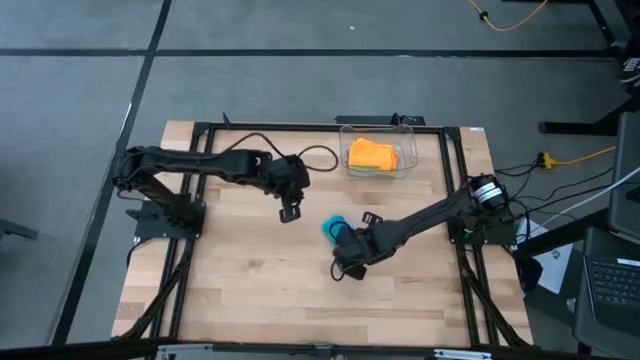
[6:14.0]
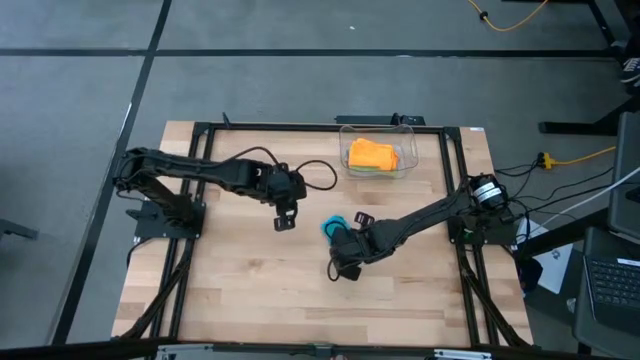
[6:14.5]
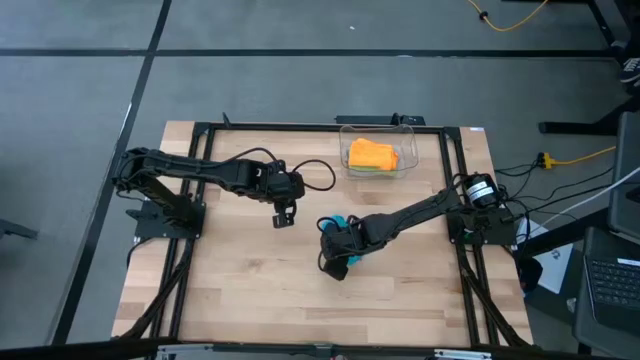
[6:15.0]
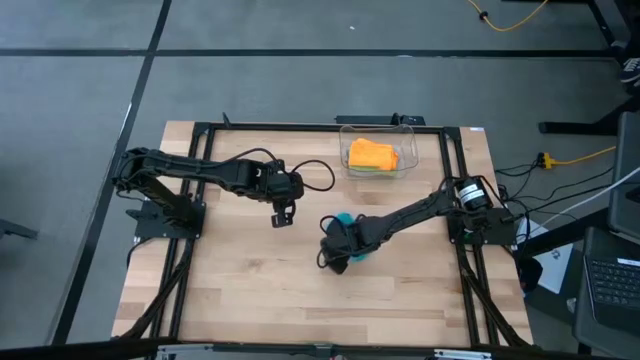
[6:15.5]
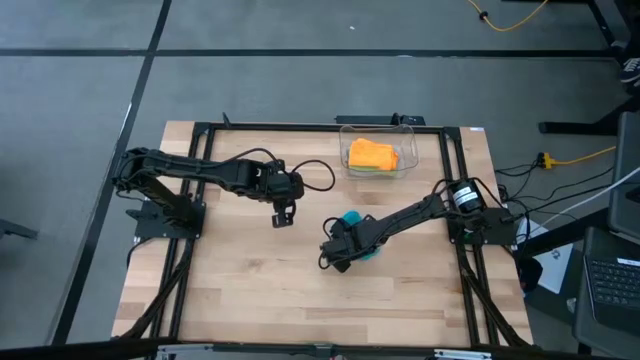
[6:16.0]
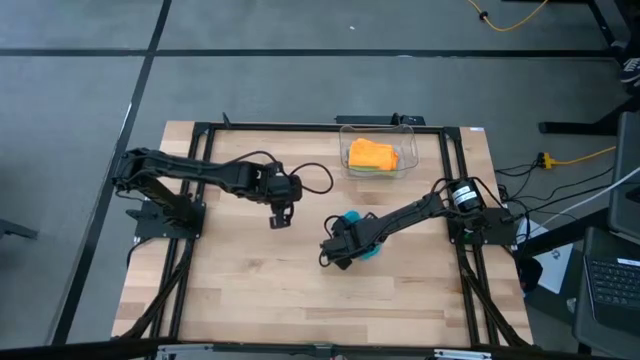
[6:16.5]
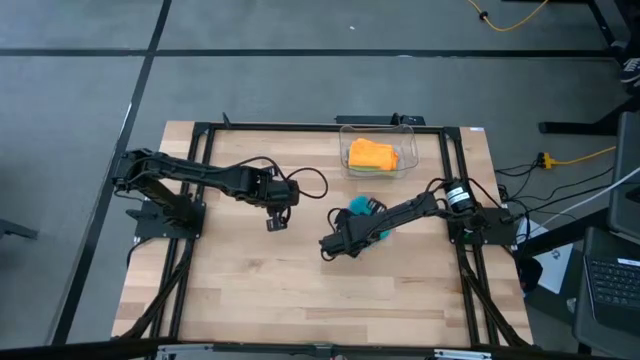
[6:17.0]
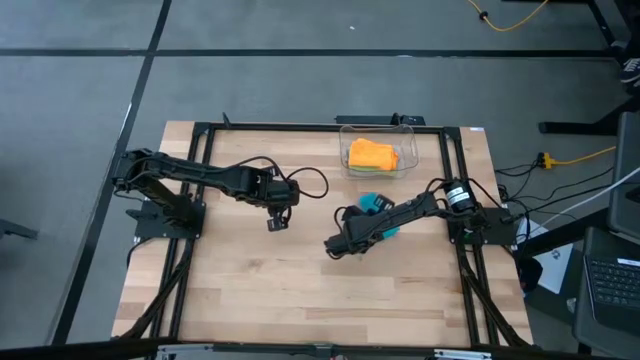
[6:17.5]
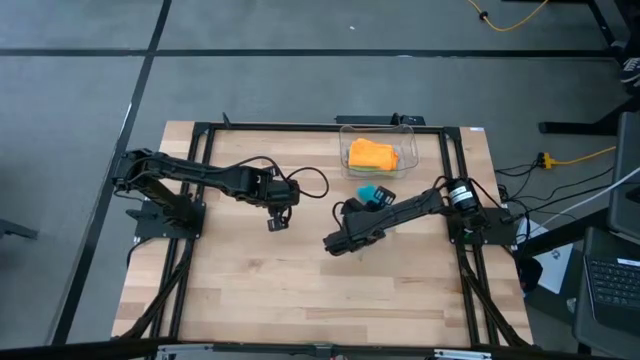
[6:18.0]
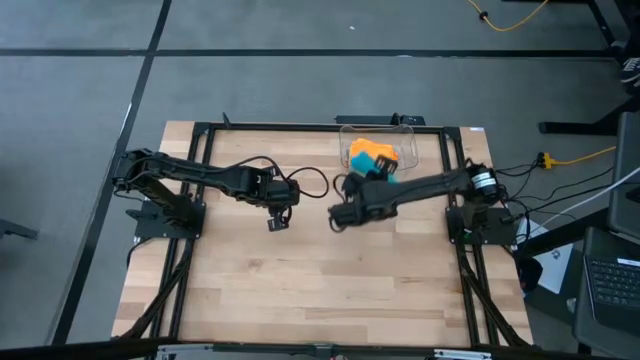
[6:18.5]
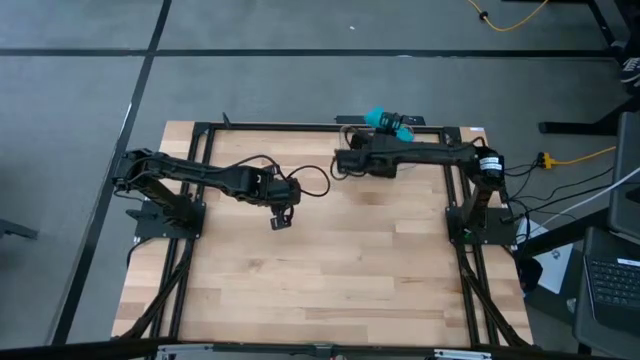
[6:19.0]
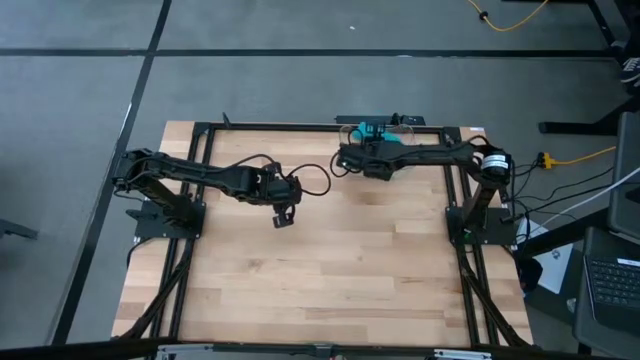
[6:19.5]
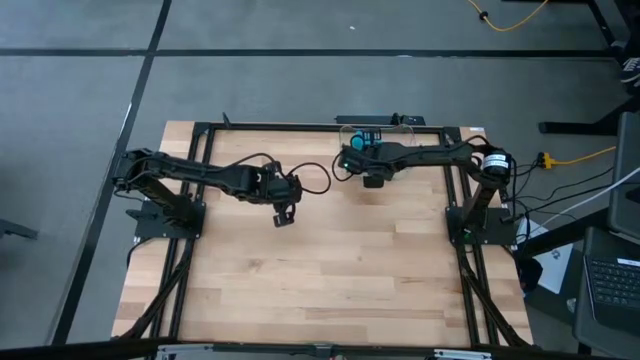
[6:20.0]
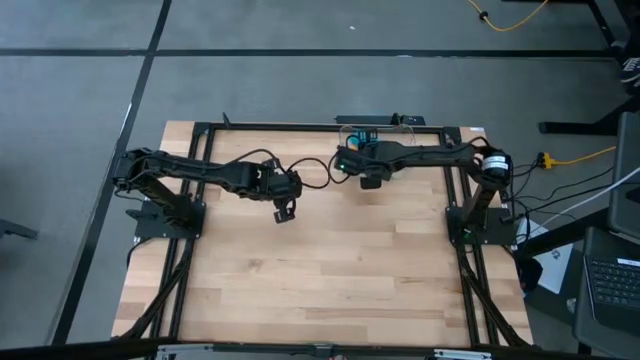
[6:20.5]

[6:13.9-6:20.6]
Task: Fold microfiber towels
Put the folded blue microfiber into the transparent bin

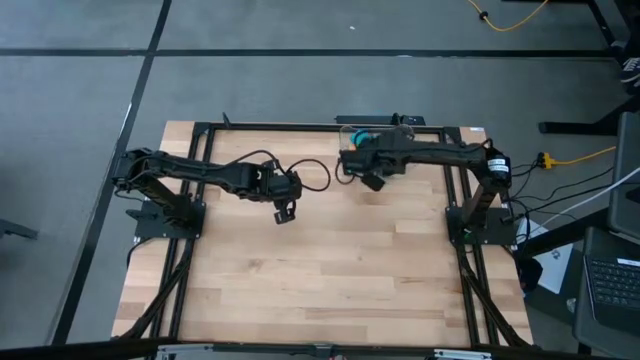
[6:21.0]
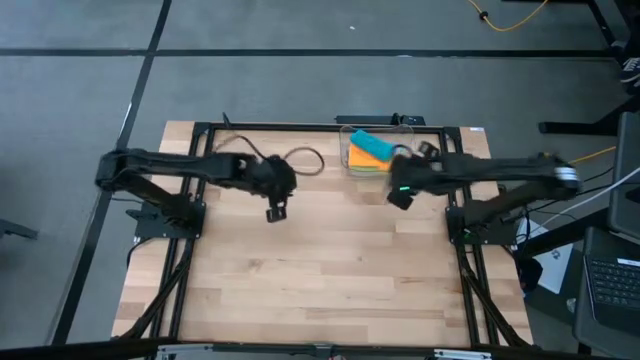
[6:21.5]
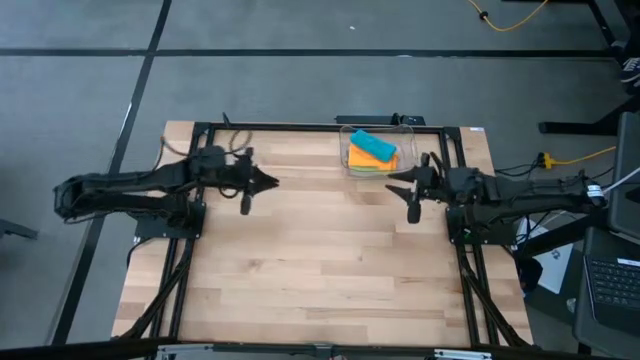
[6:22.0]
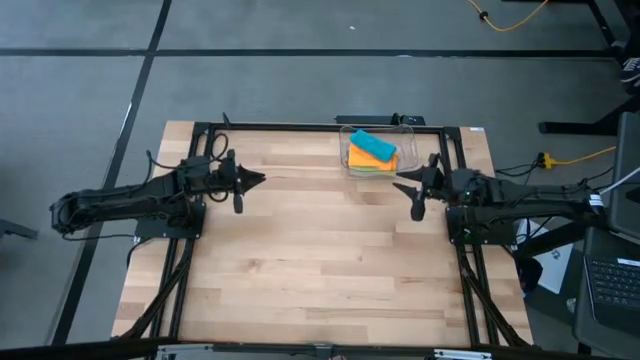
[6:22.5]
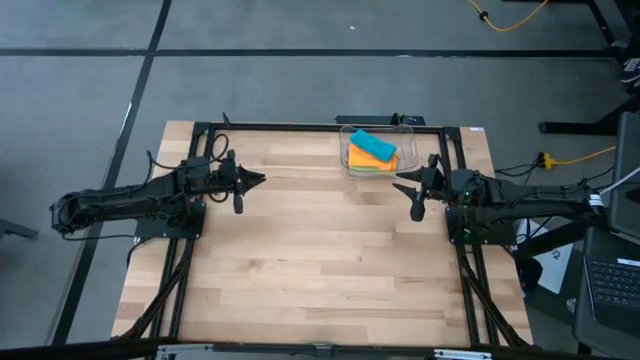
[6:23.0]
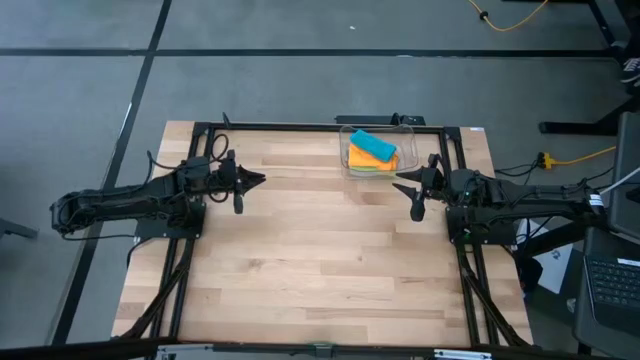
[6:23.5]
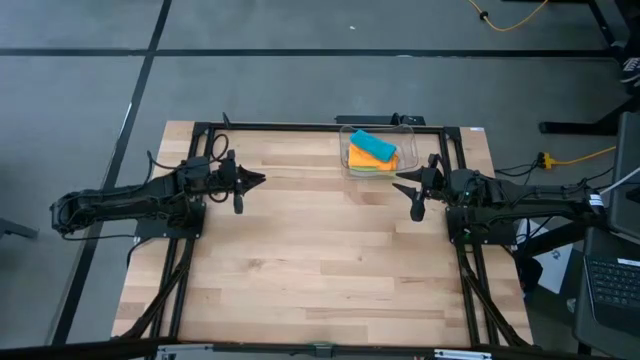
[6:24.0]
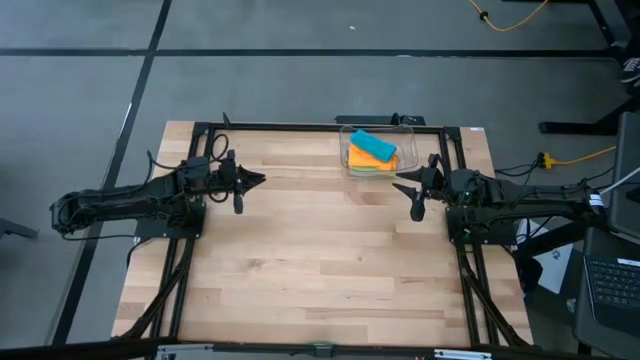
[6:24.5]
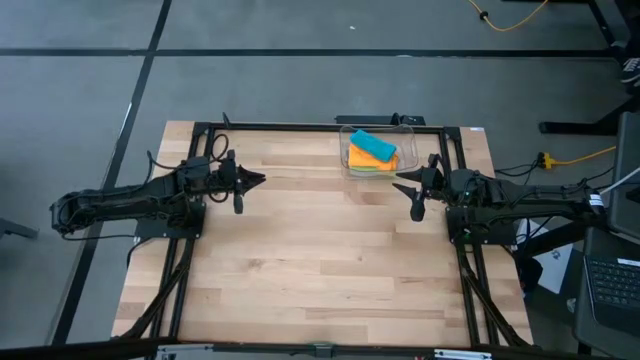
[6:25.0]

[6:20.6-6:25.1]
Return to Home Position

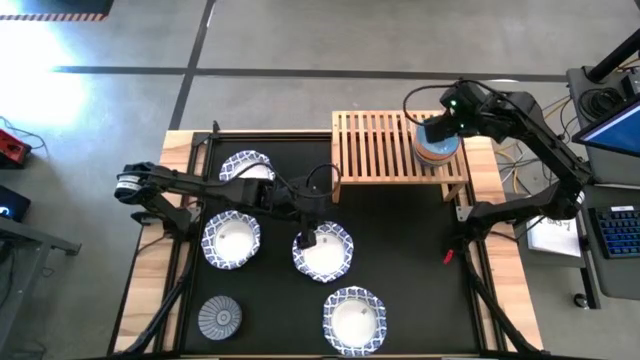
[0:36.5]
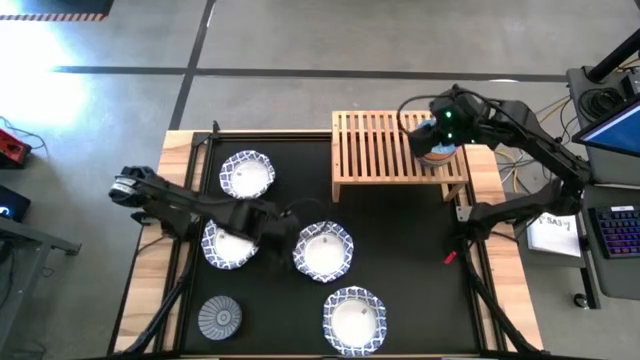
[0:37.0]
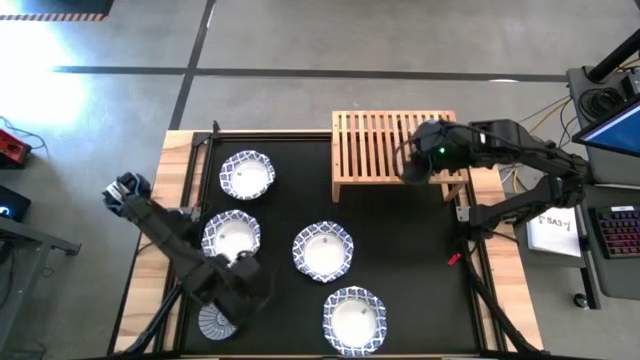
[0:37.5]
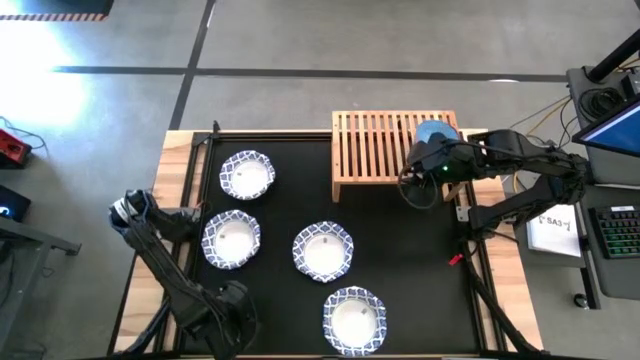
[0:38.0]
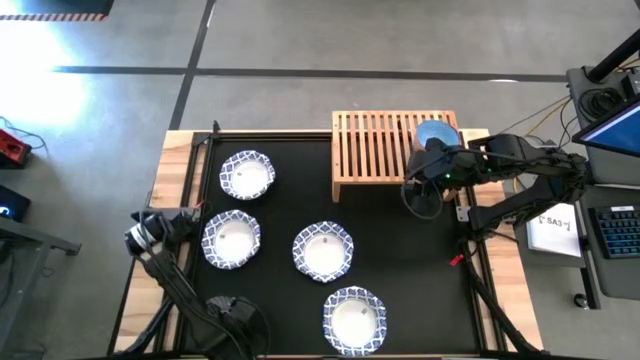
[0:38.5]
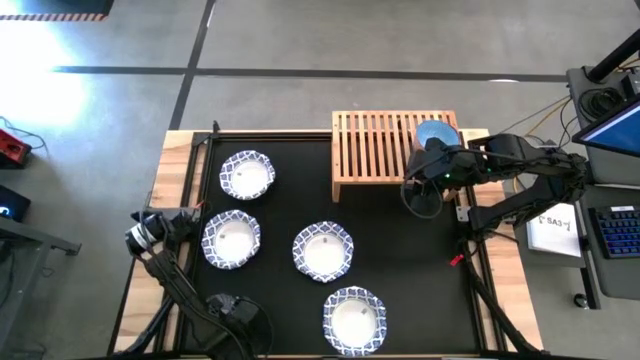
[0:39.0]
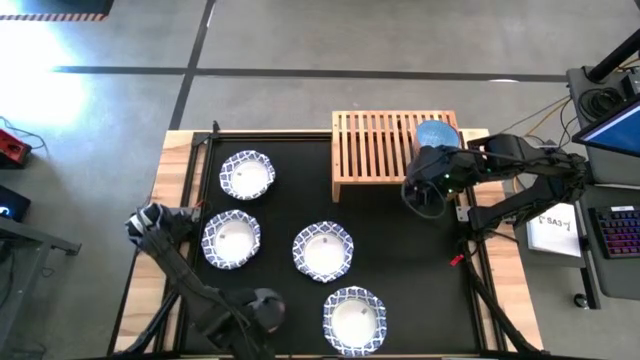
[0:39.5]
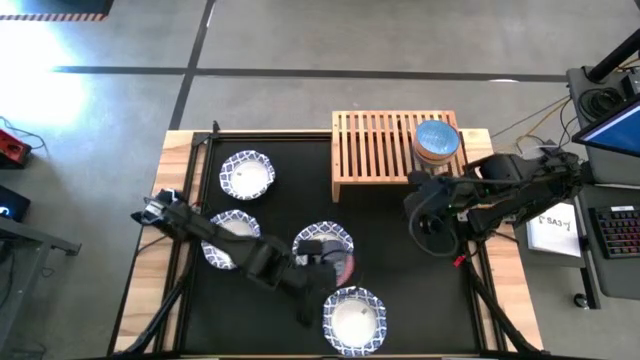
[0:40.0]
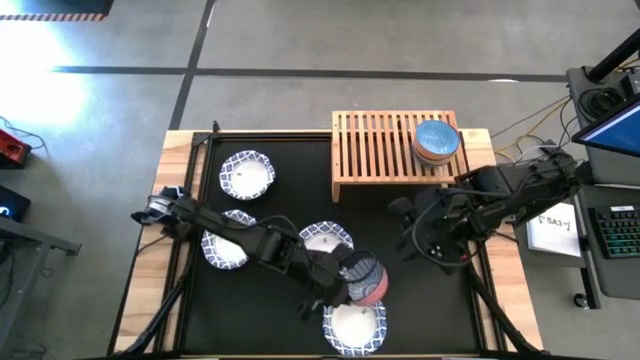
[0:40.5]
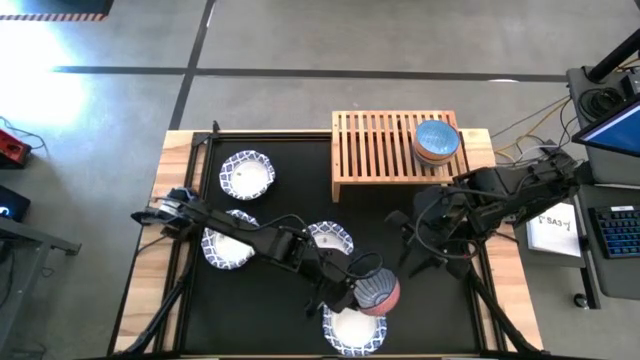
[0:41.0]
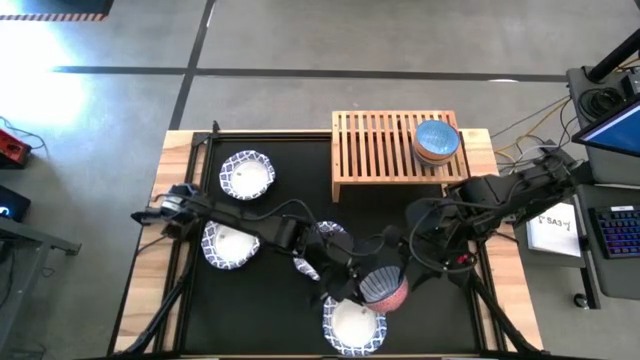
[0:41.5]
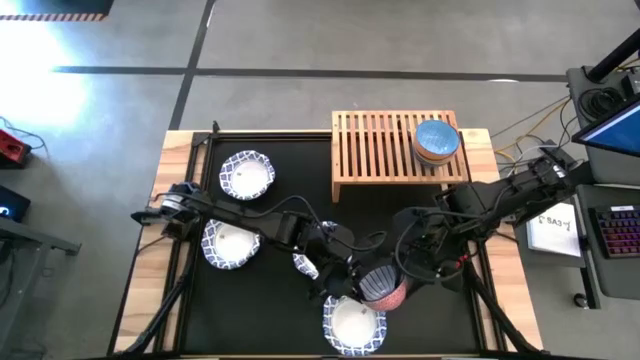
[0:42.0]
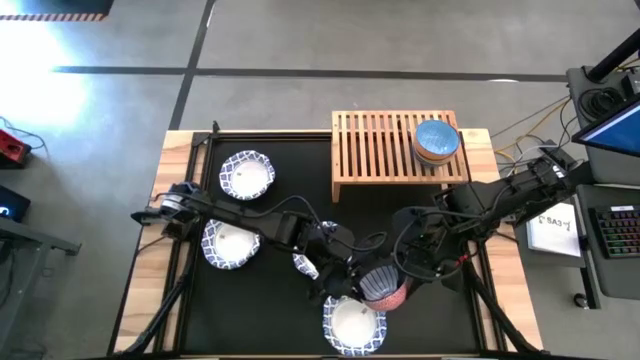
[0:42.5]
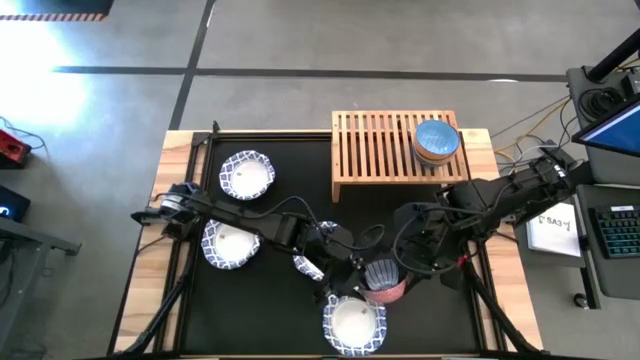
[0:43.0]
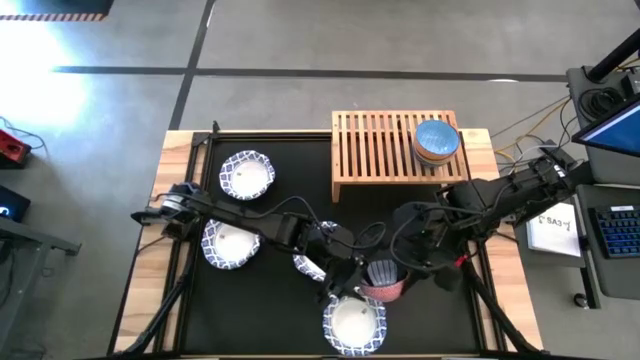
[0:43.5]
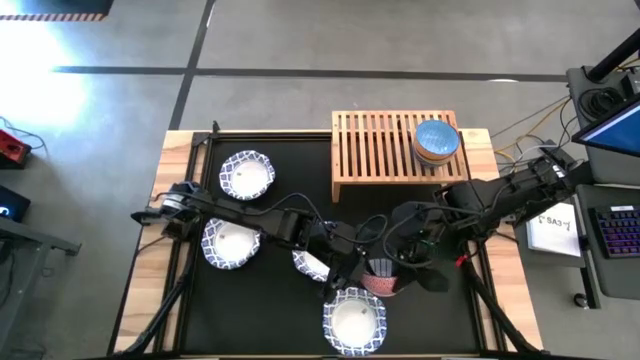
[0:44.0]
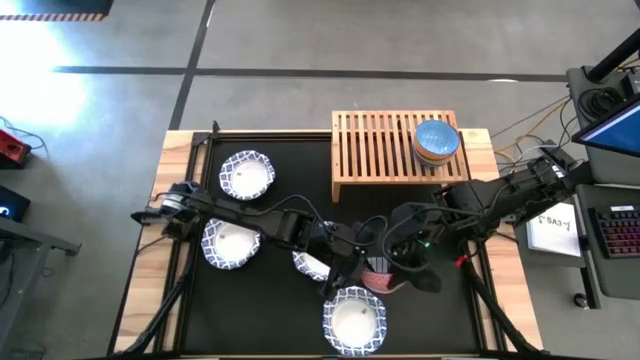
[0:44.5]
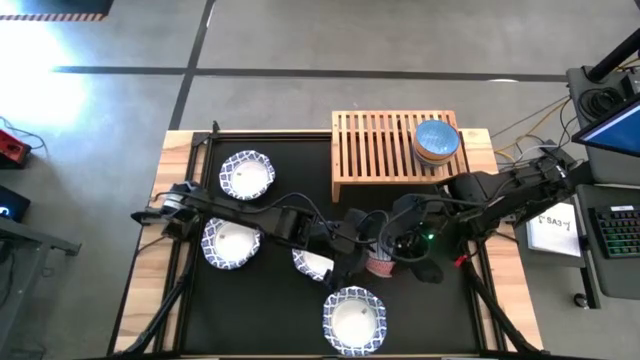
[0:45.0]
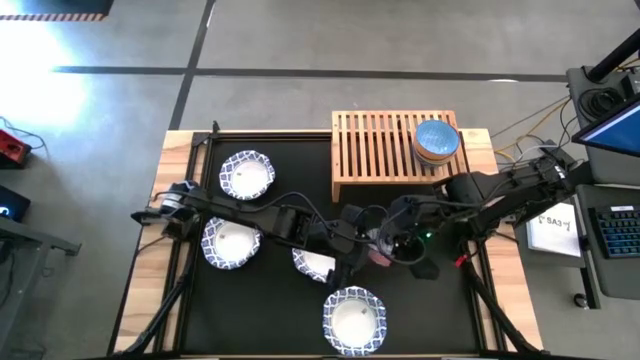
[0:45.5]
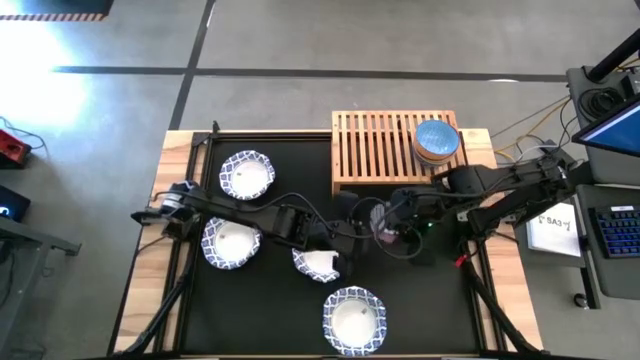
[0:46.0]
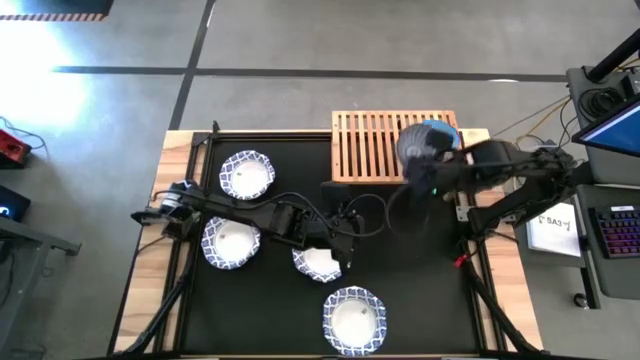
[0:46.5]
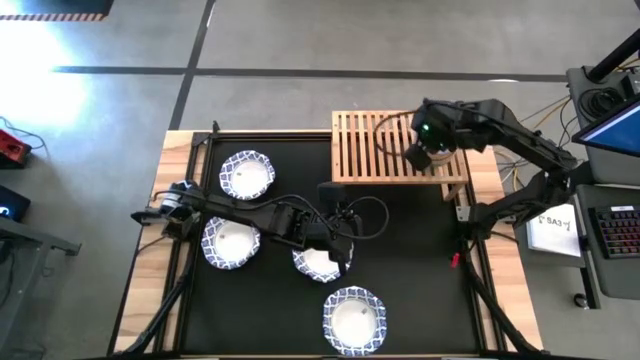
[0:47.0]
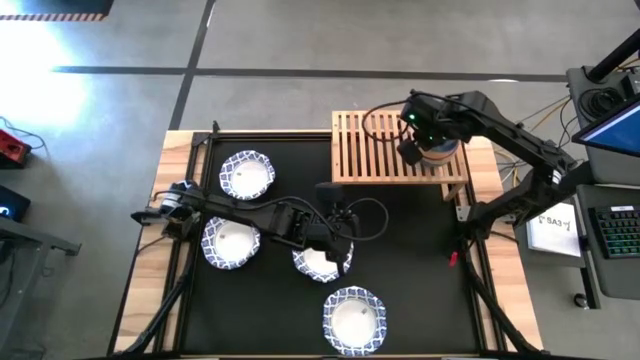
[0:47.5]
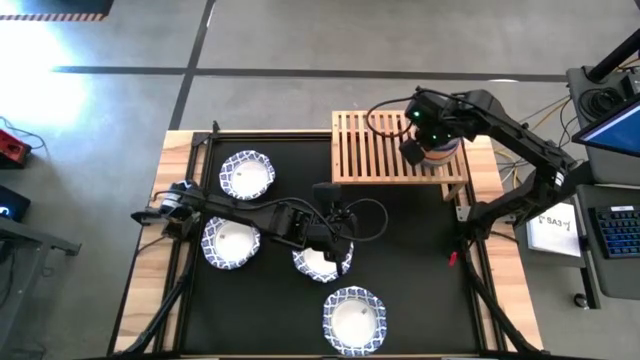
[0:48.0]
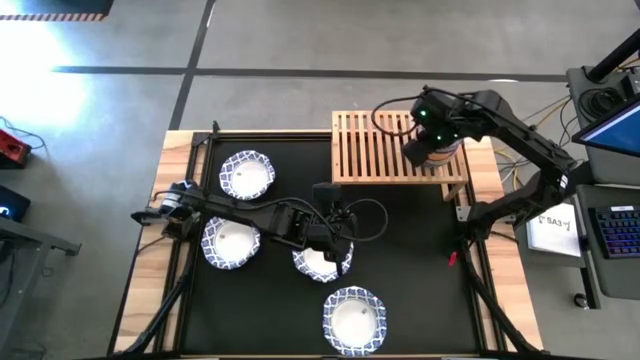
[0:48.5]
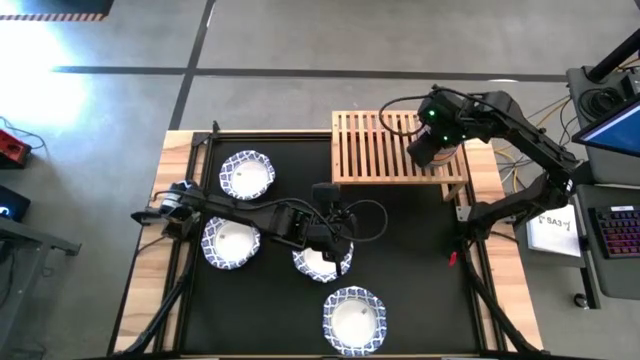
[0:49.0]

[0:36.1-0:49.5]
Task: Place and stack bowls onto a shelf
Stack the blue bowl on top of the light blue bowl on the shelf
